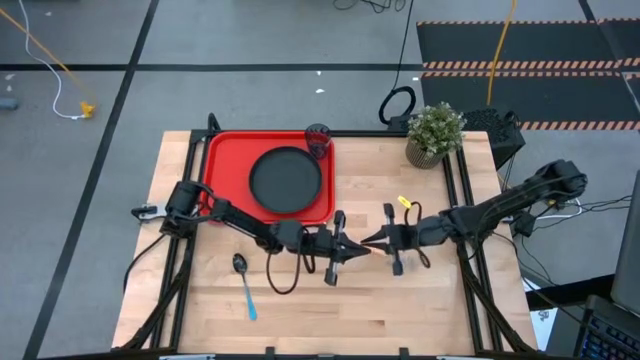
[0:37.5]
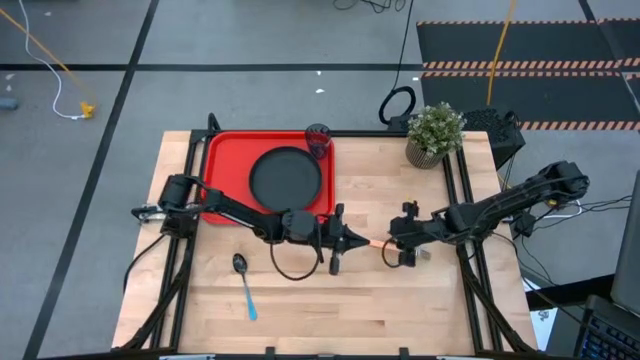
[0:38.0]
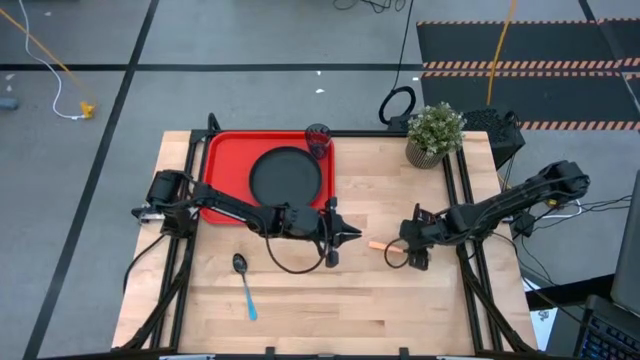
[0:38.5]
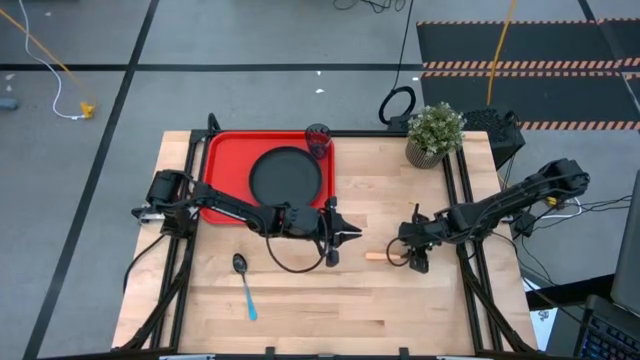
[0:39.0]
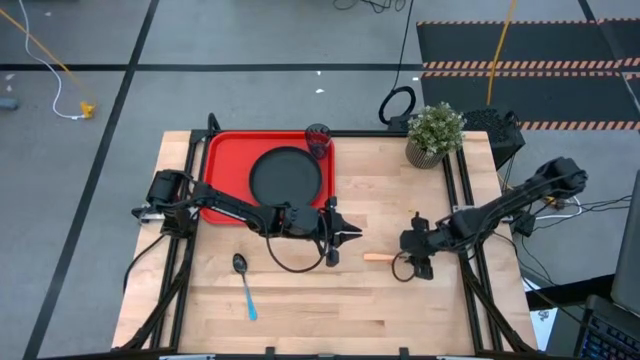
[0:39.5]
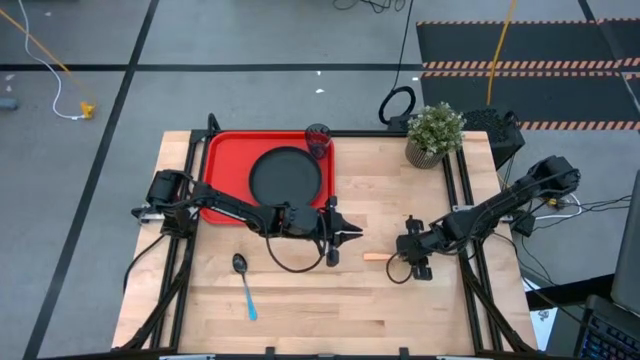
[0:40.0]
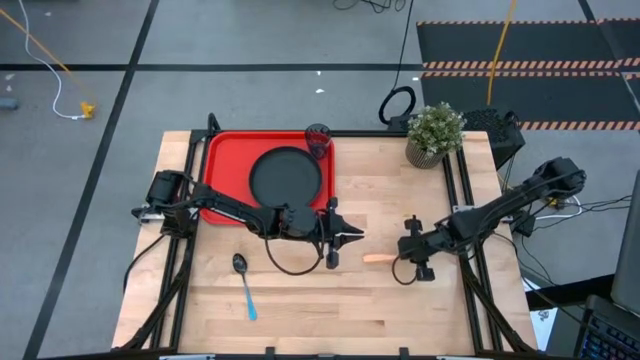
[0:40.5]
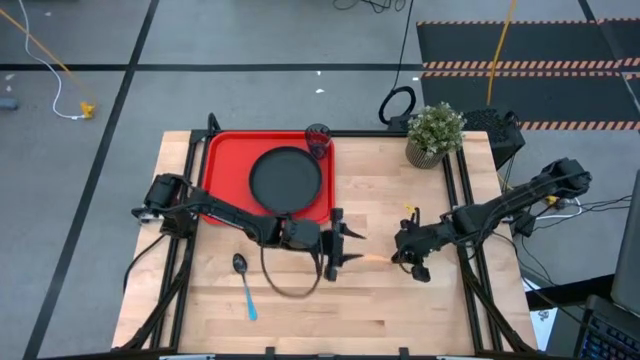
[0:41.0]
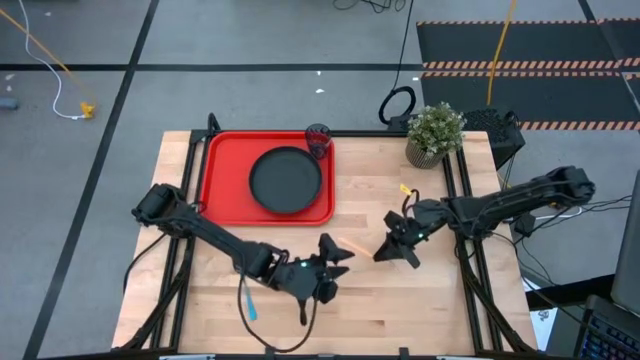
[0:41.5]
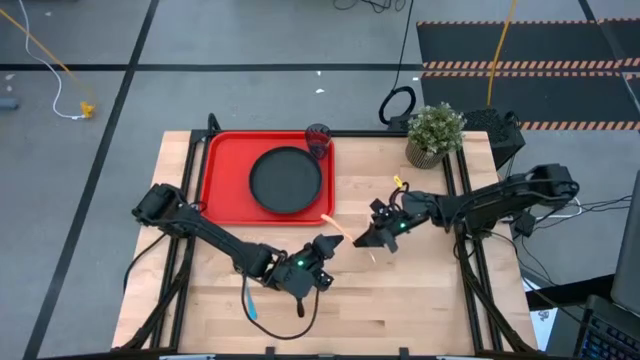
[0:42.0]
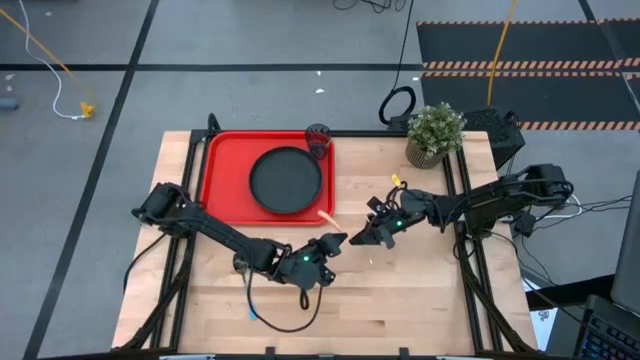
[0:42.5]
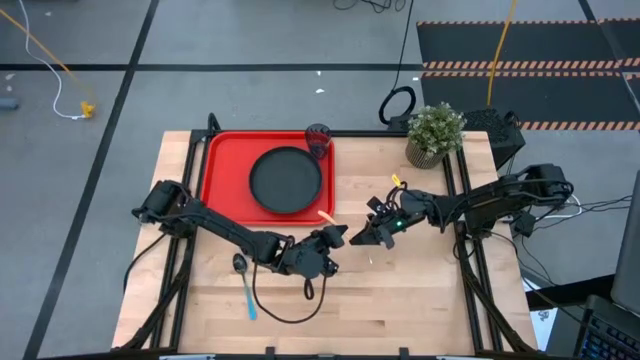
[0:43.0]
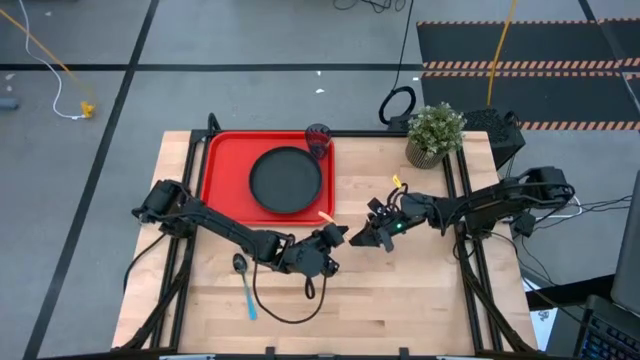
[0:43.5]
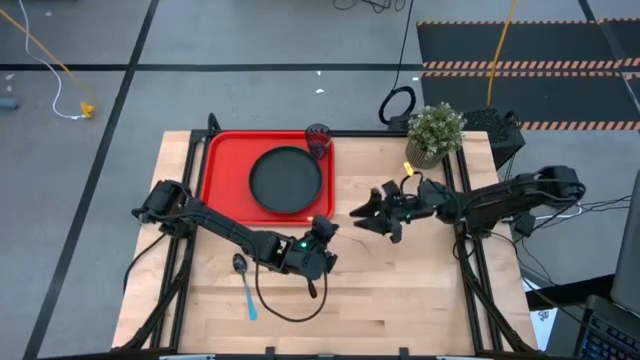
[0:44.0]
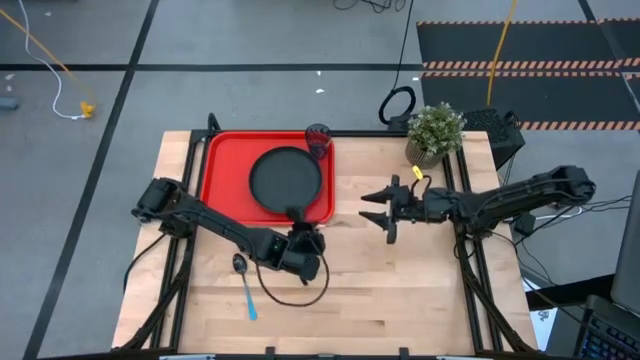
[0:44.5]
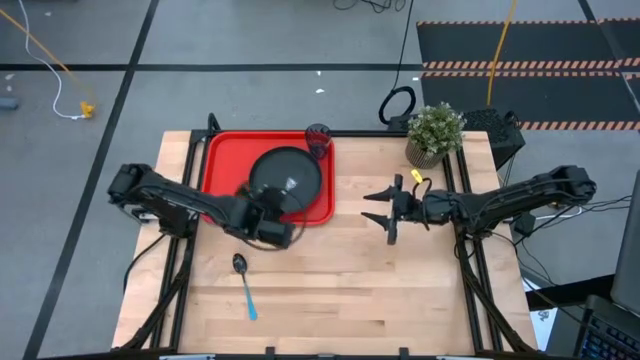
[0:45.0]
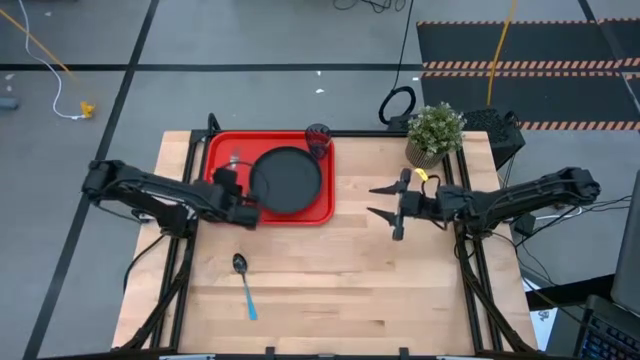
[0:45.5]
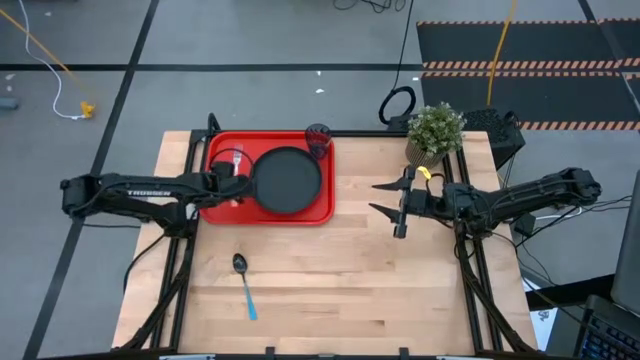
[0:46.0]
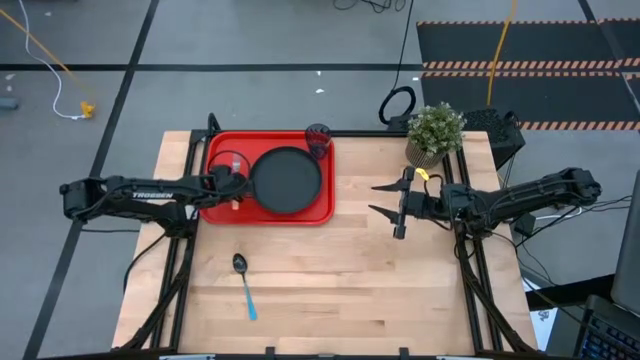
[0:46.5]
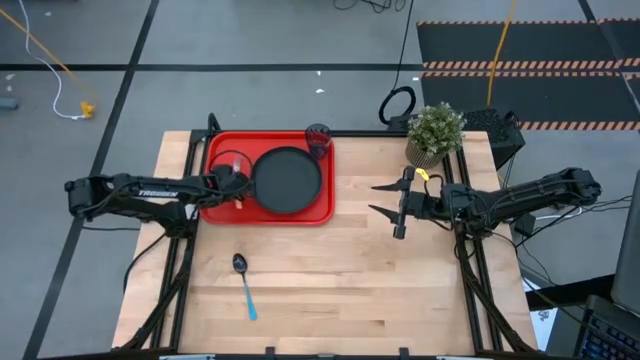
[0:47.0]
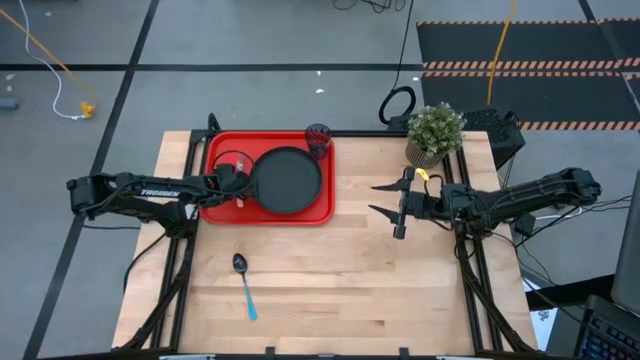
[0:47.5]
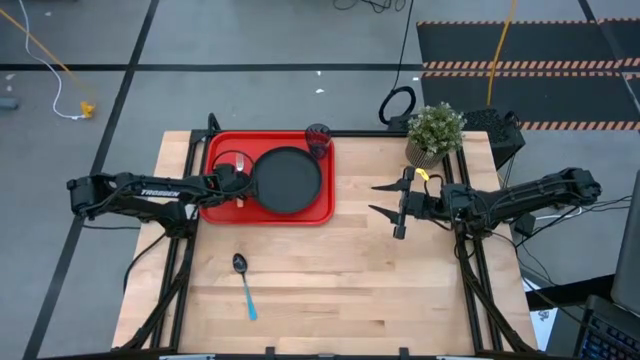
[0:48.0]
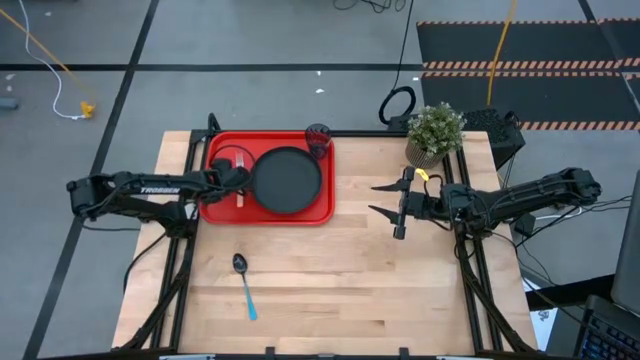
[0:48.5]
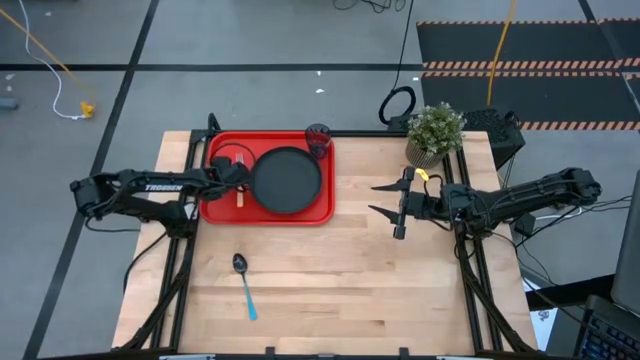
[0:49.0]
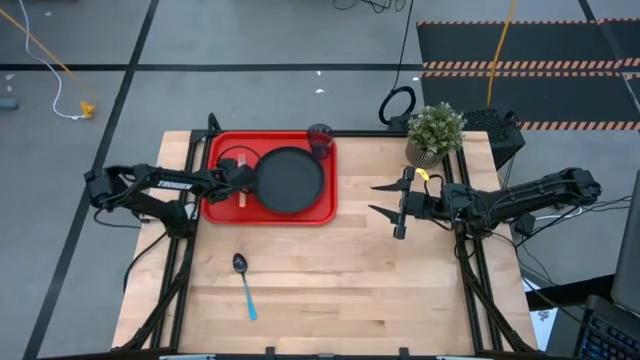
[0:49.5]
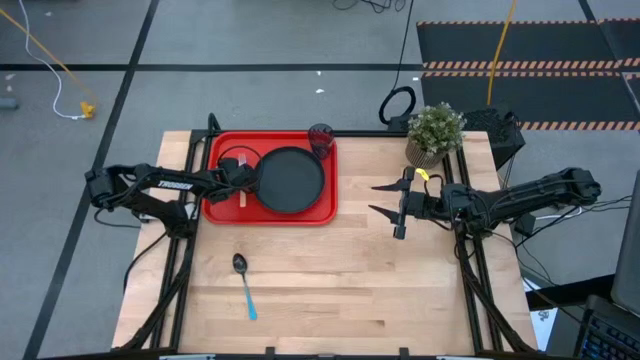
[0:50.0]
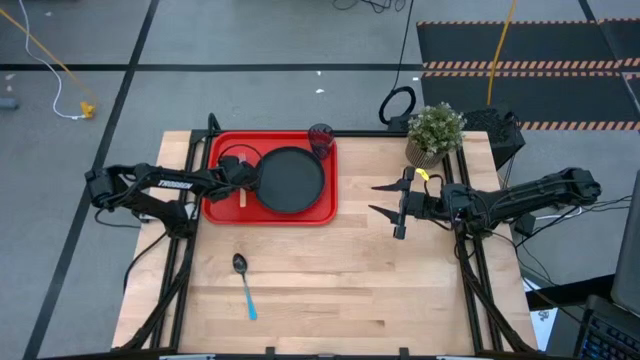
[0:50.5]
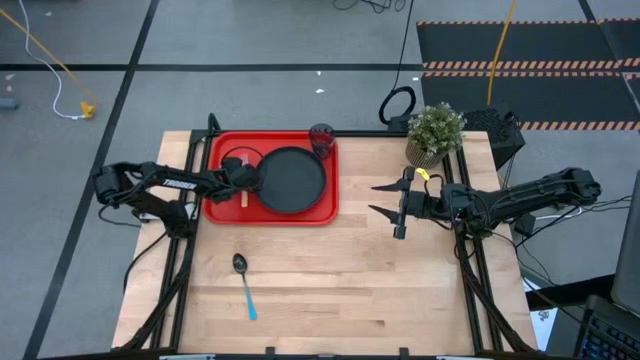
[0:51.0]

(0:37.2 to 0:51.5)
Task: Pick and place plate/cup/fork/spoon on tray
Put the light orange fork on the red tray to the left of the black plate

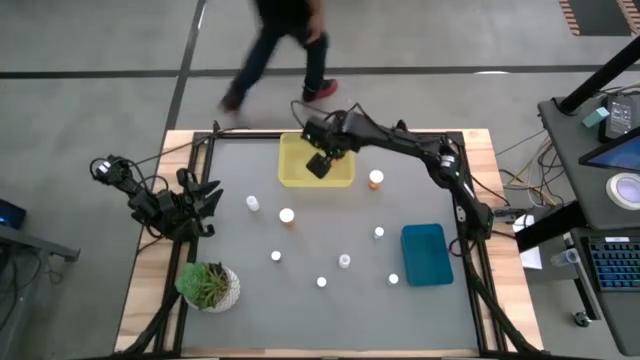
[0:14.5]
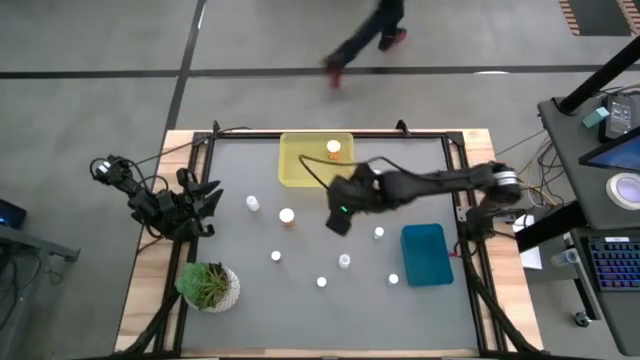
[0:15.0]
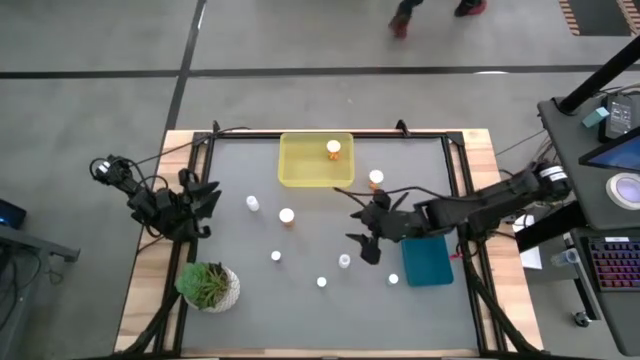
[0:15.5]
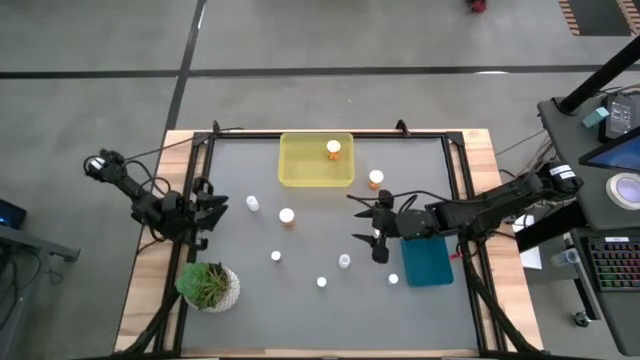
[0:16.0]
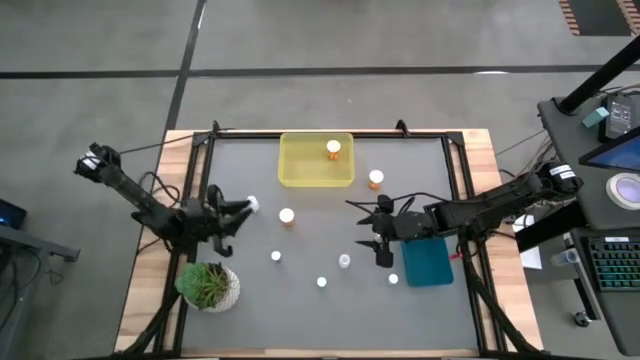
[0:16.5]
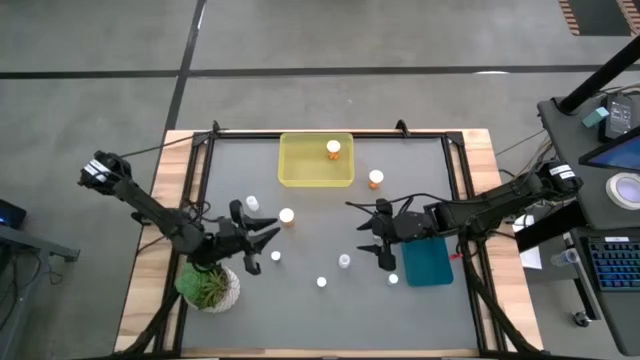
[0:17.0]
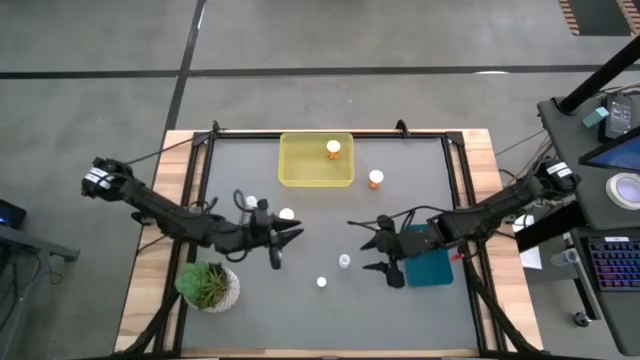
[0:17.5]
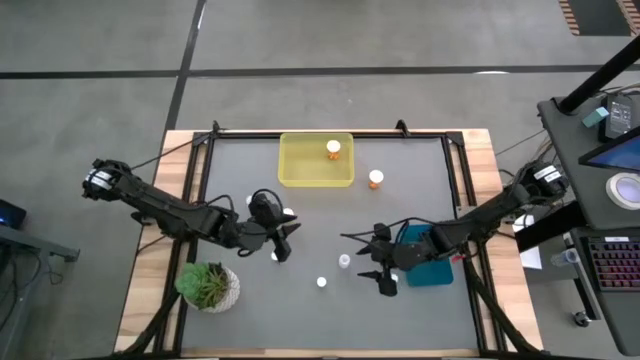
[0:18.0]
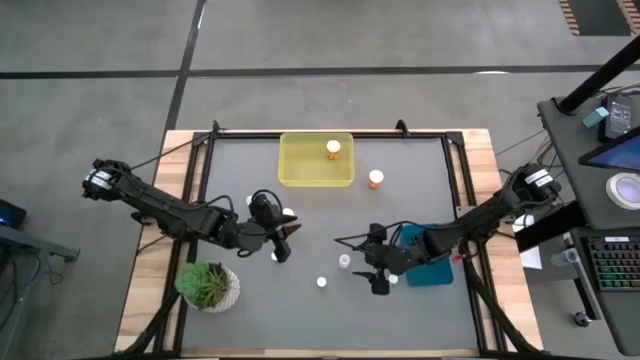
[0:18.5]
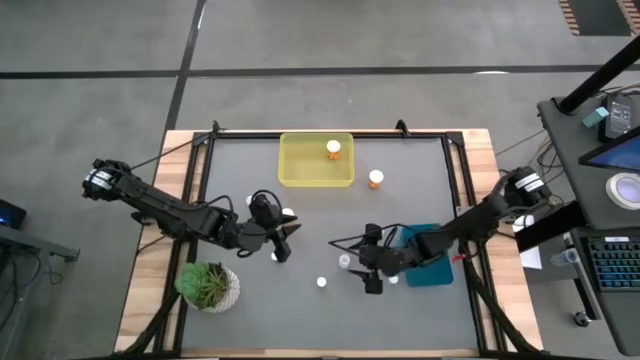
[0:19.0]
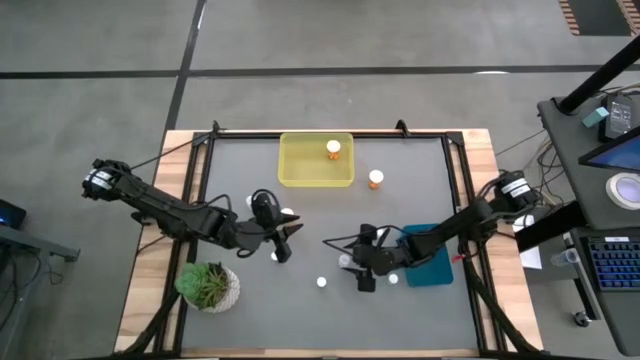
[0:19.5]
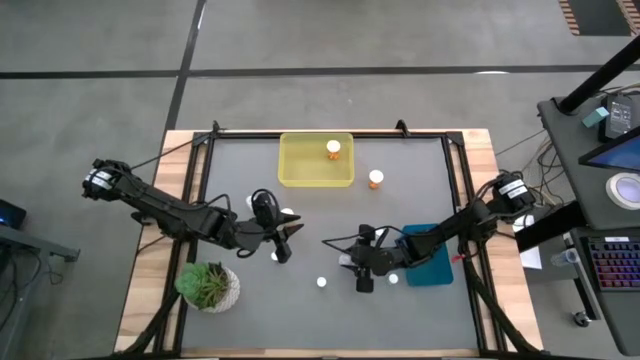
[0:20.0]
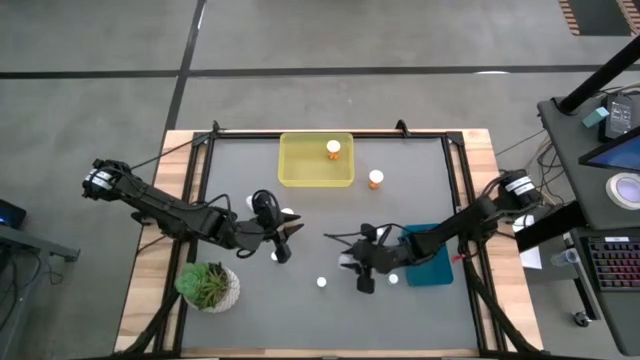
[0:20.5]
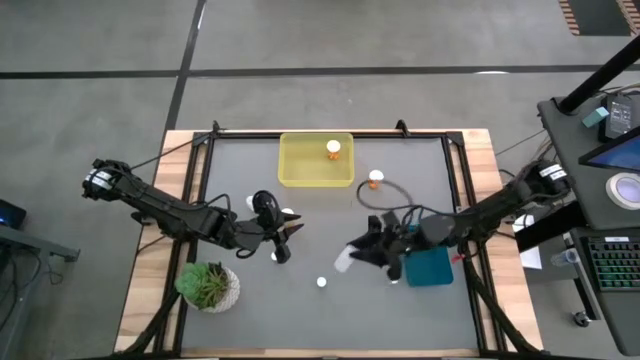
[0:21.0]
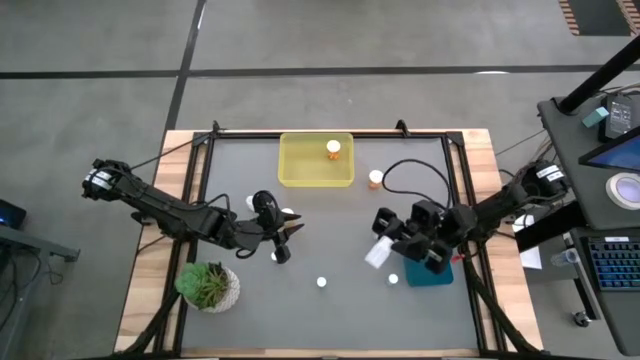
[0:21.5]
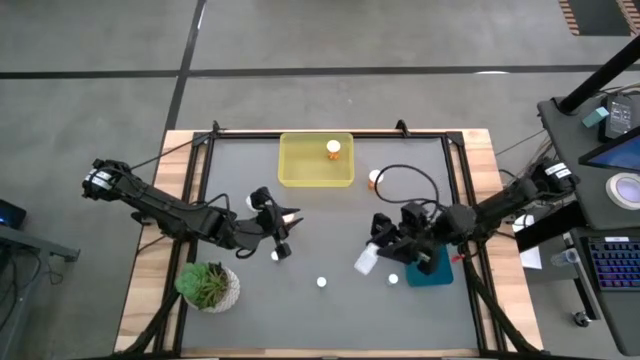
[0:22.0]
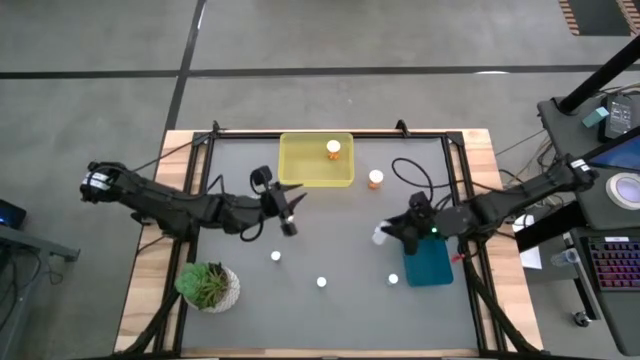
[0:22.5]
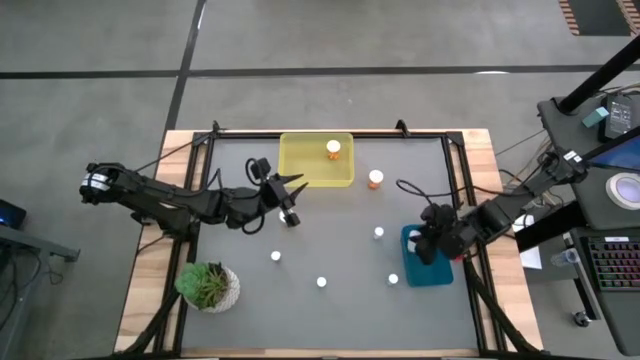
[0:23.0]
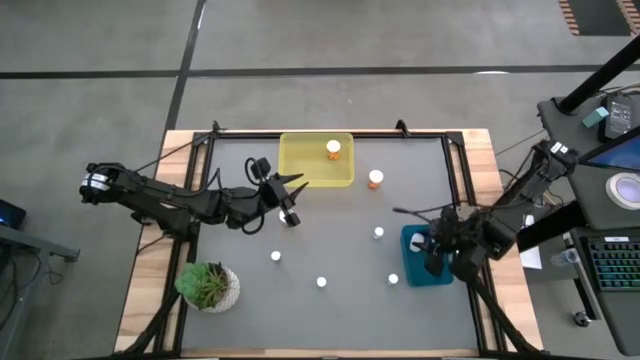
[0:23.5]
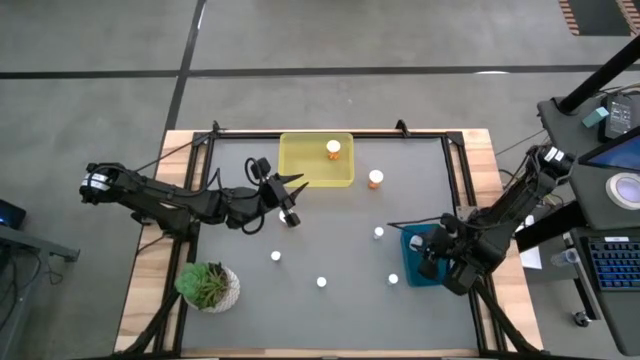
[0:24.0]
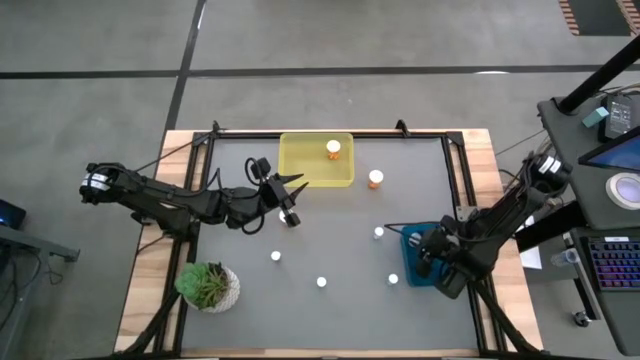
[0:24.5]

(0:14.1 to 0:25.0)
Task: Pick and place medicine bottles into bin by pill shape (circle, oval)
Put the white pill bottle into the blue bin
